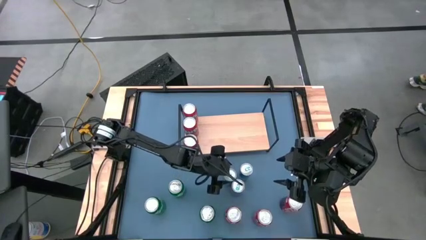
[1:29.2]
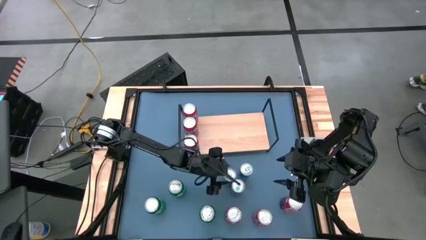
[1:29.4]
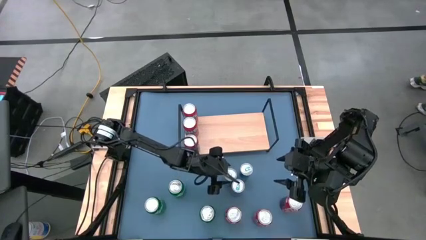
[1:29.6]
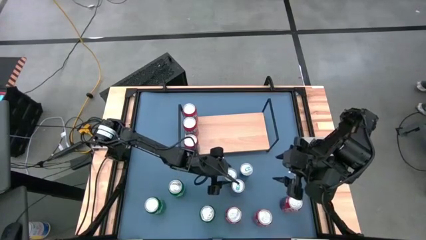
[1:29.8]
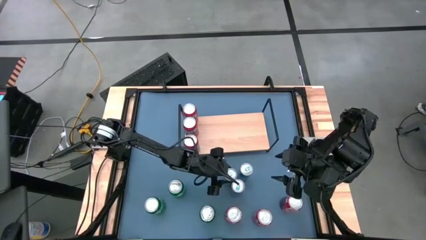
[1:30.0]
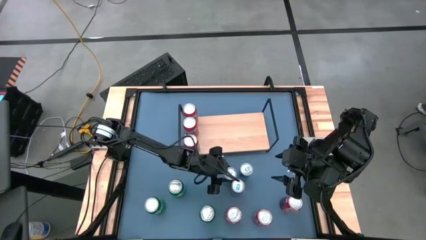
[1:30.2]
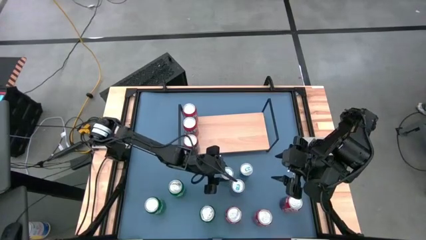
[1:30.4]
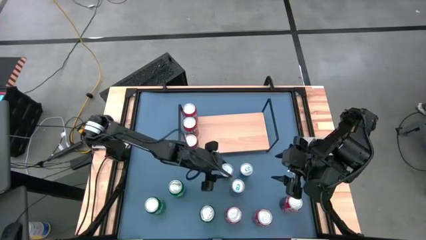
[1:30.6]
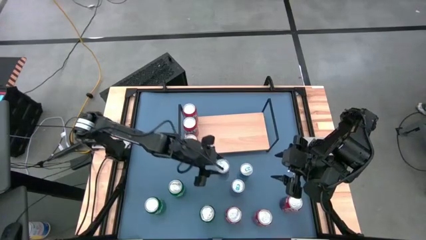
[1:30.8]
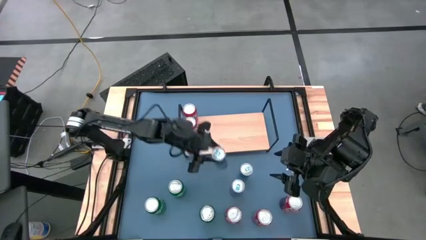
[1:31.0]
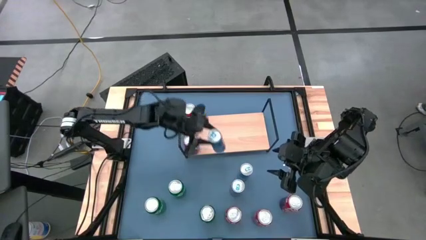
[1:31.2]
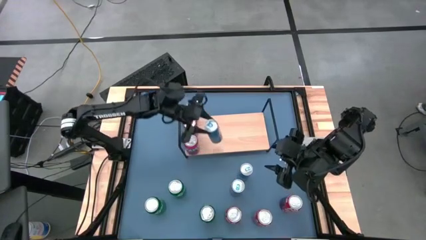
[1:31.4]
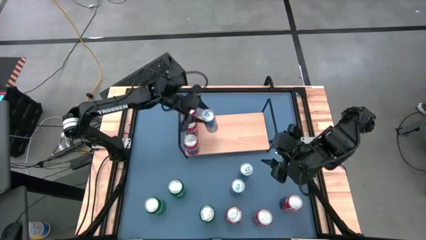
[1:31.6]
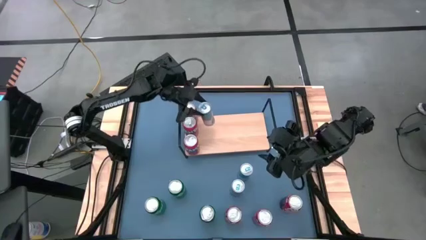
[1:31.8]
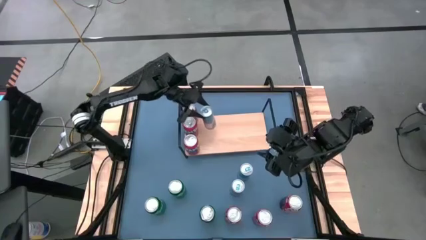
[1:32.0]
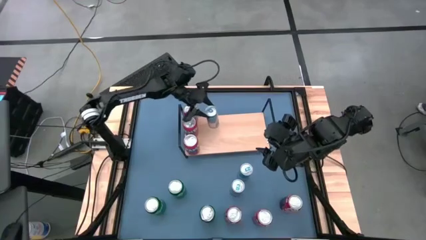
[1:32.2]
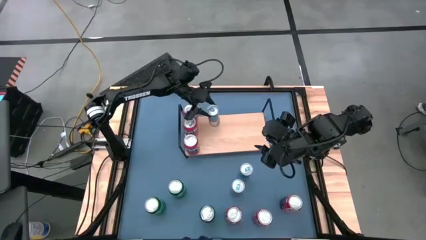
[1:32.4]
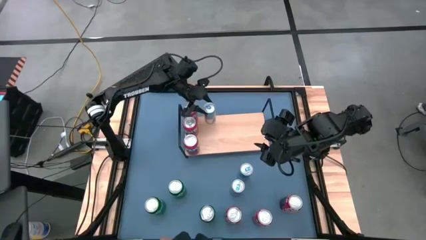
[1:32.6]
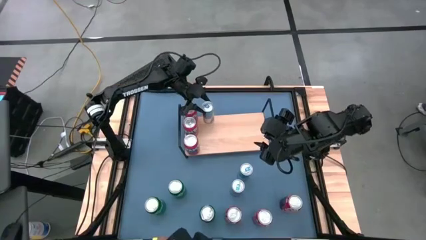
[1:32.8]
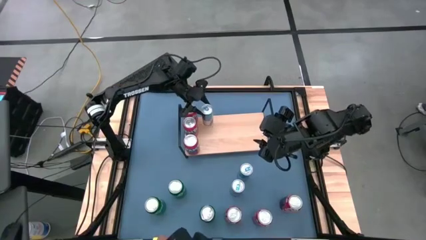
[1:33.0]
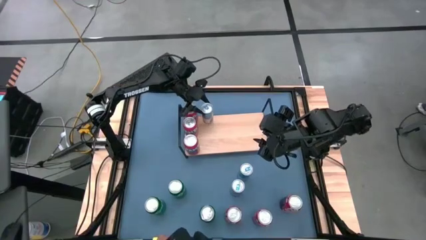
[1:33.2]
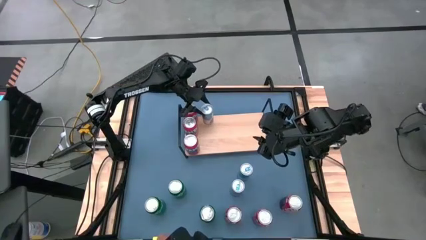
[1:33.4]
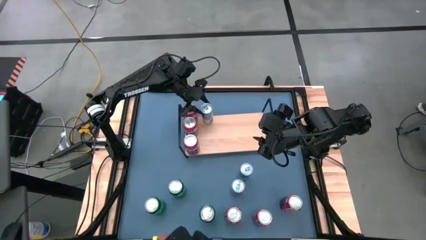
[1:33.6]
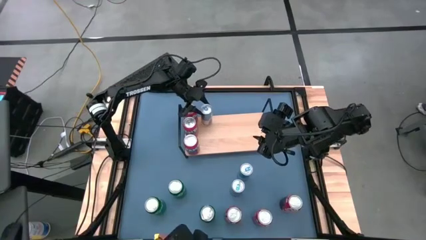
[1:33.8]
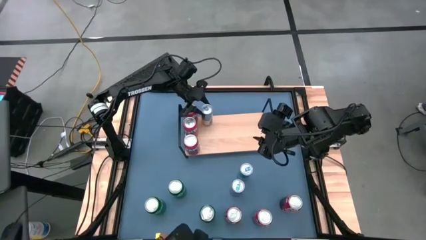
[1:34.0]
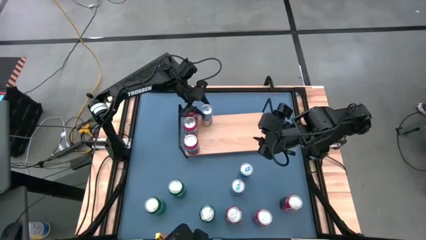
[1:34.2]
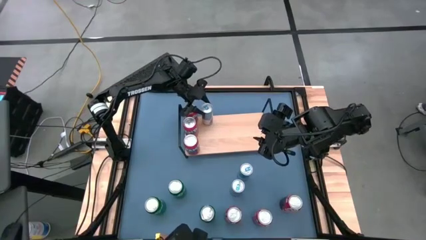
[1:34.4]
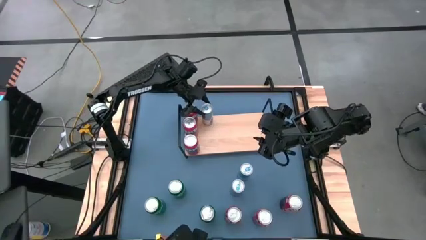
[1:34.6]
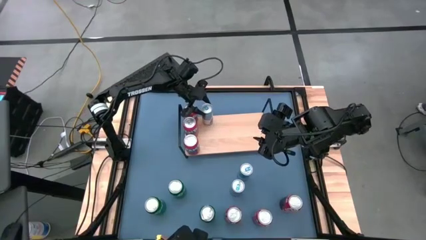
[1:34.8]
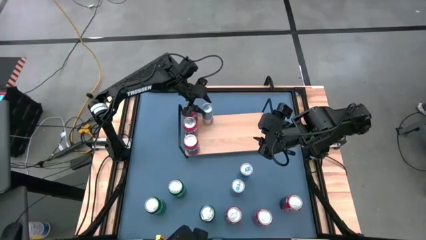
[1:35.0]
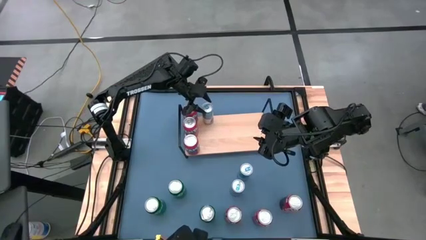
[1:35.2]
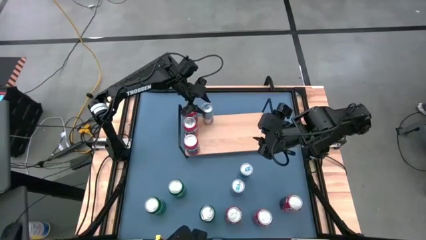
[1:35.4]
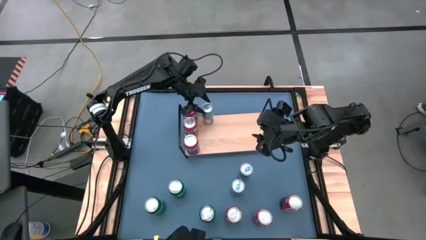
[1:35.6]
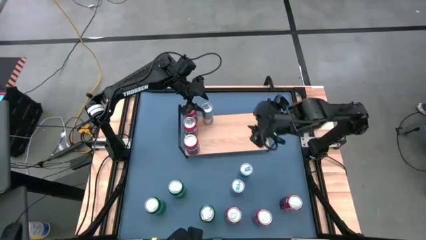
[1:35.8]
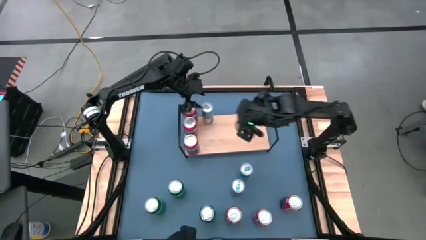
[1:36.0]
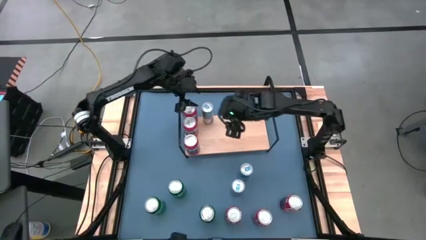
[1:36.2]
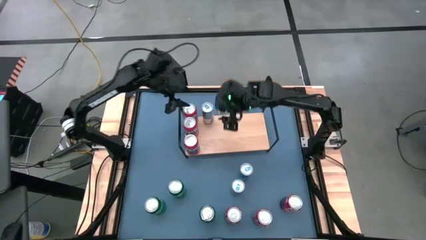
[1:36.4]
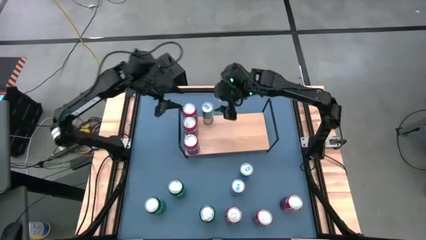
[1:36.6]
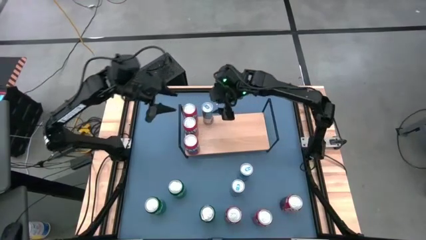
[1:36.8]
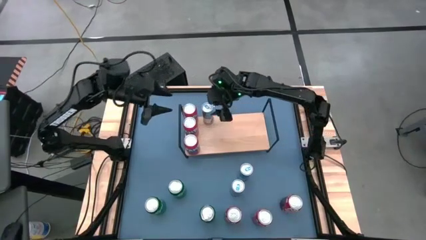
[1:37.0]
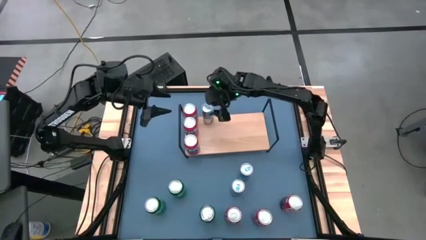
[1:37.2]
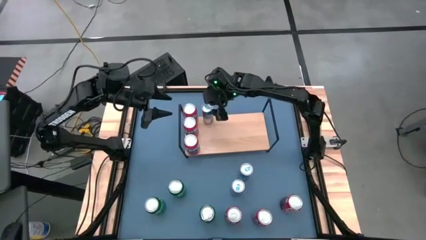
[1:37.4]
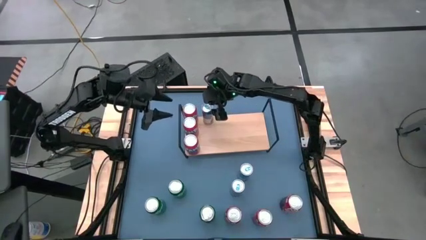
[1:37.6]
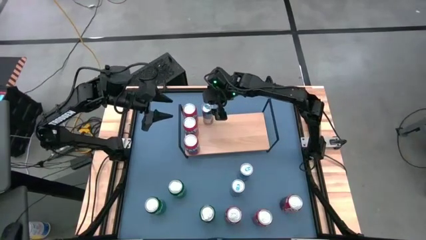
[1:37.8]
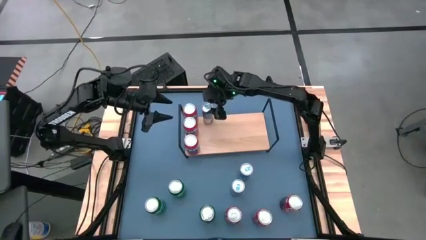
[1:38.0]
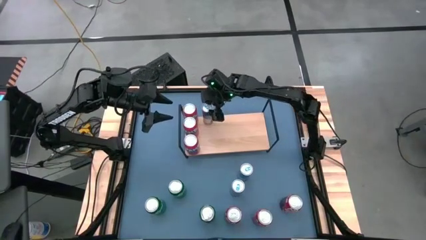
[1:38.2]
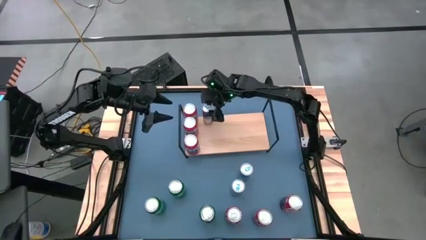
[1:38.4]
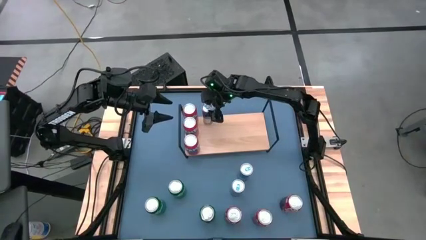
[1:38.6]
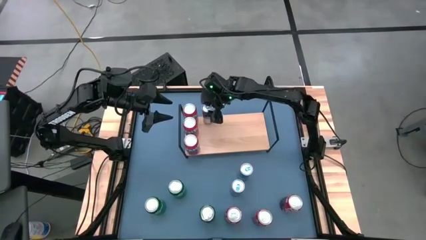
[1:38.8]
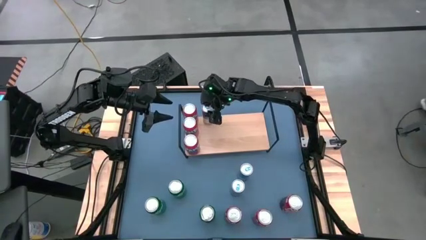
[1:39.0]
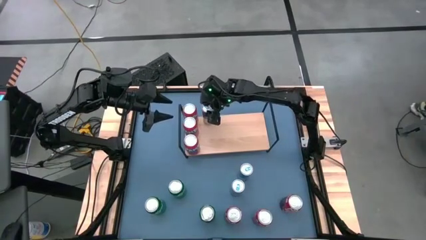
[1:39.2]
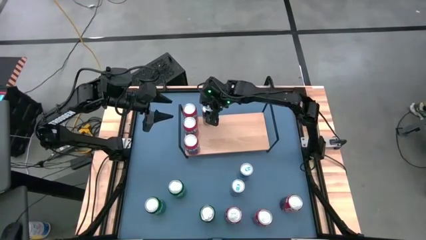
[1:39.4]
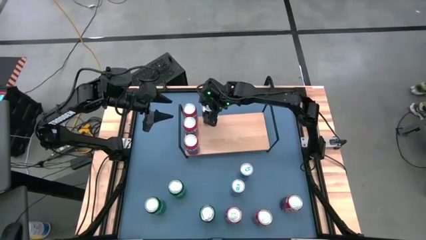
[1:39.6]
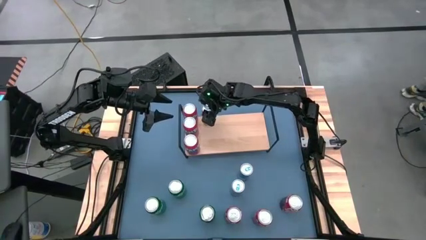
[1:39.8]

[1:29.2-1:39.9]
Task: Place canned beverage on shelf
Put the blue soda can on the shelf
